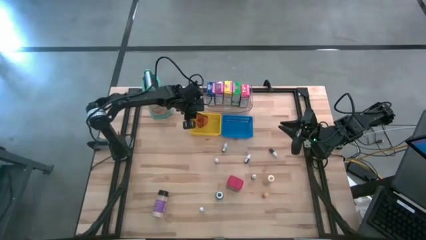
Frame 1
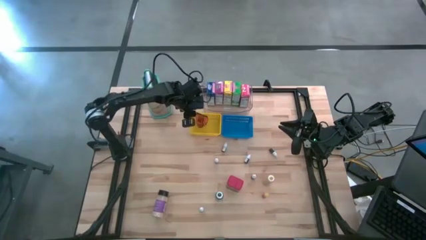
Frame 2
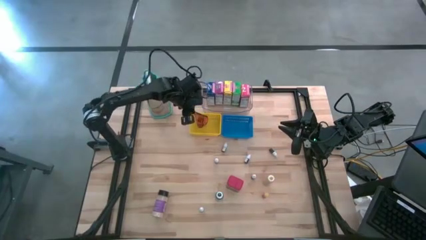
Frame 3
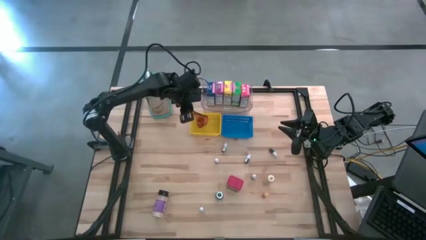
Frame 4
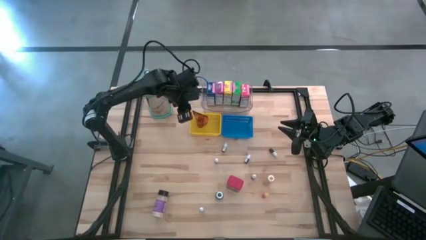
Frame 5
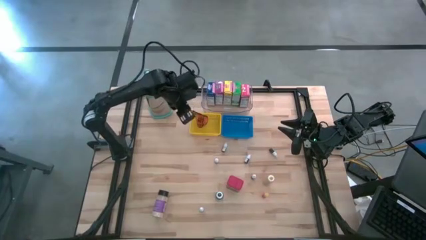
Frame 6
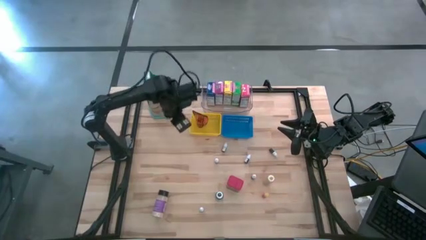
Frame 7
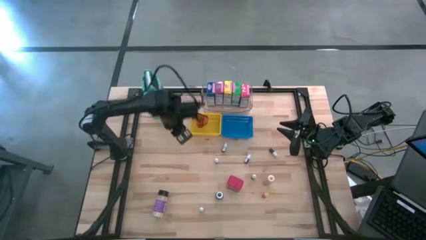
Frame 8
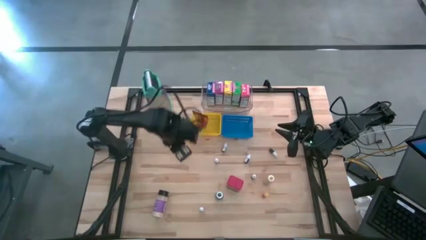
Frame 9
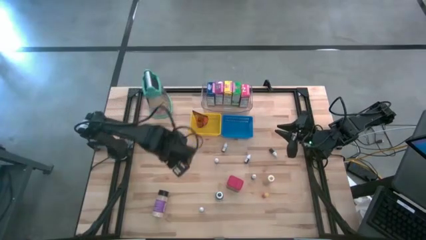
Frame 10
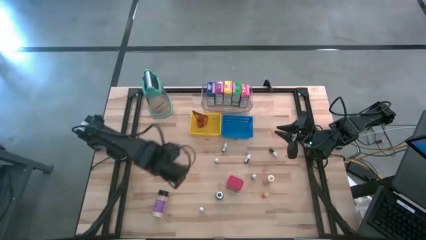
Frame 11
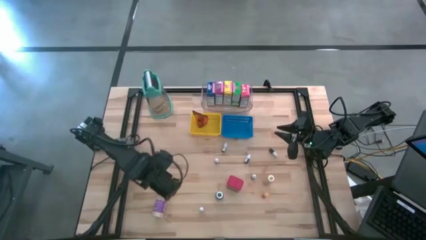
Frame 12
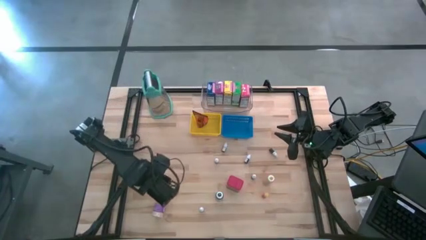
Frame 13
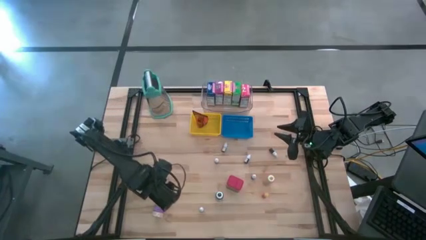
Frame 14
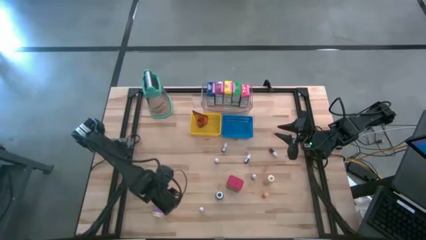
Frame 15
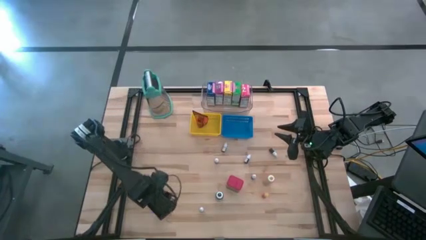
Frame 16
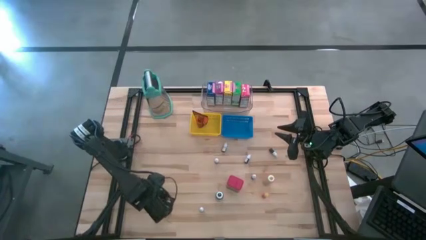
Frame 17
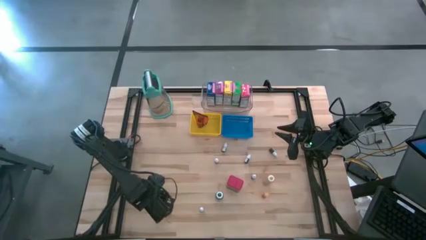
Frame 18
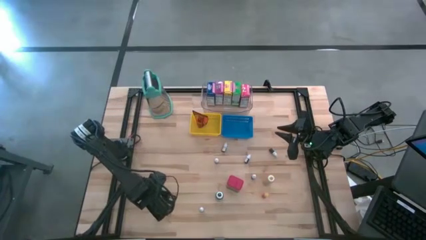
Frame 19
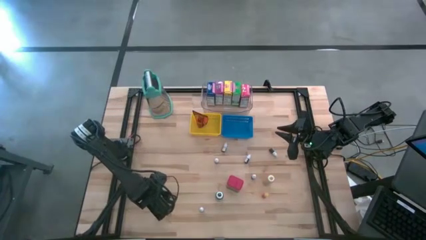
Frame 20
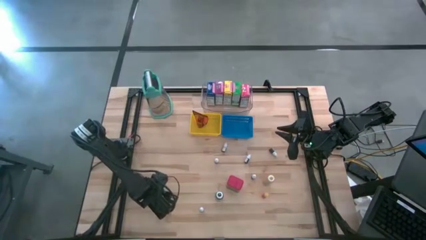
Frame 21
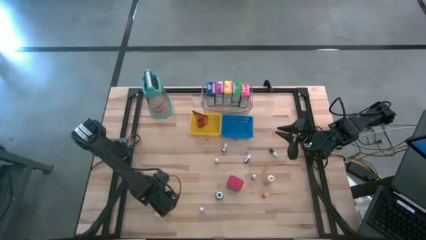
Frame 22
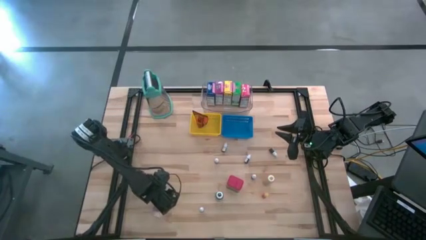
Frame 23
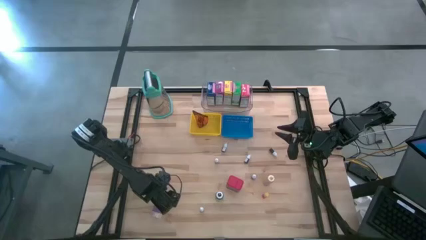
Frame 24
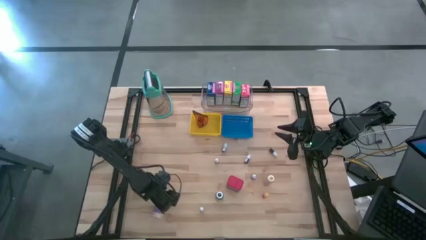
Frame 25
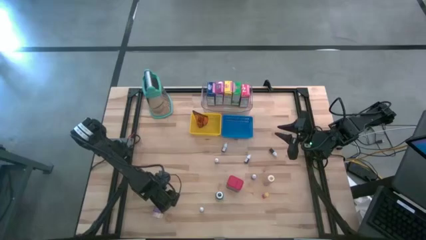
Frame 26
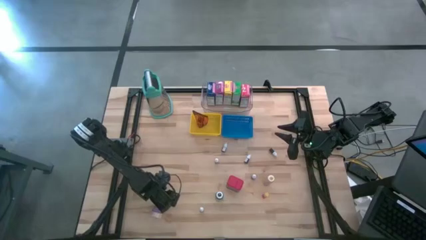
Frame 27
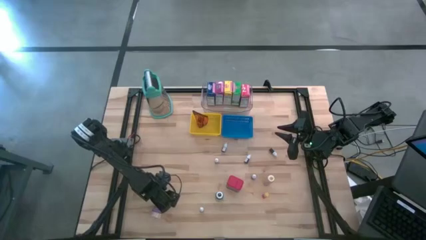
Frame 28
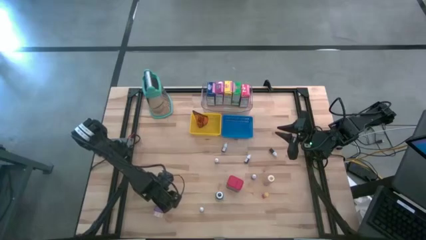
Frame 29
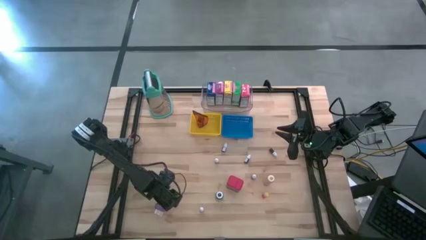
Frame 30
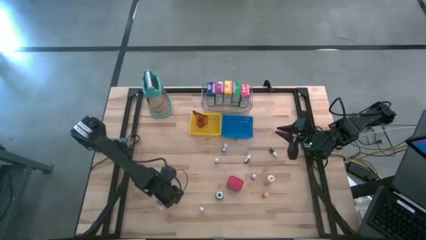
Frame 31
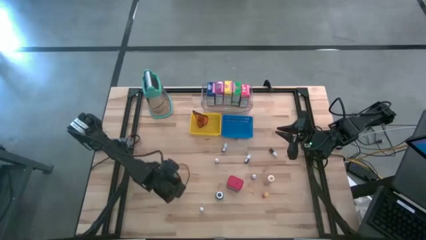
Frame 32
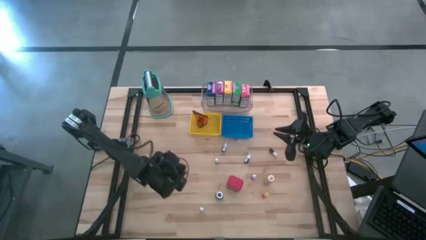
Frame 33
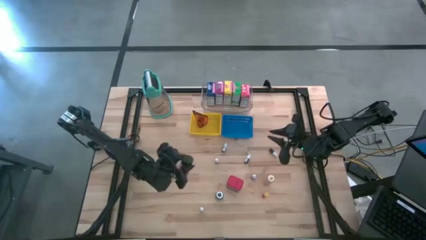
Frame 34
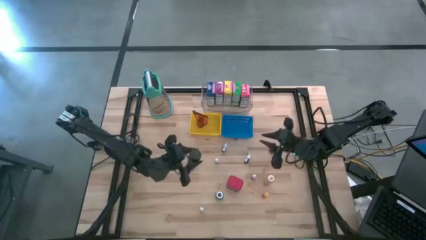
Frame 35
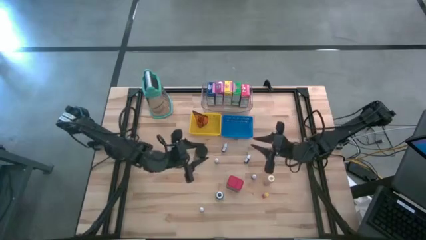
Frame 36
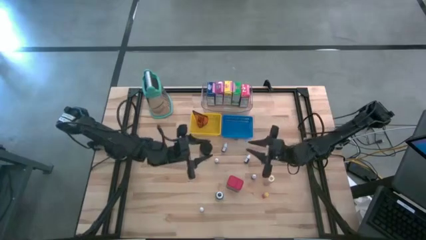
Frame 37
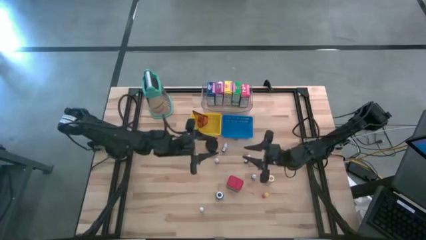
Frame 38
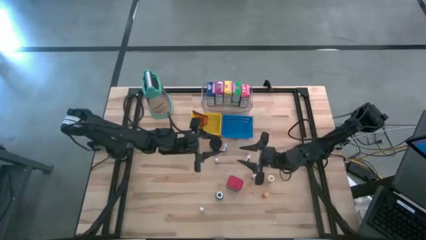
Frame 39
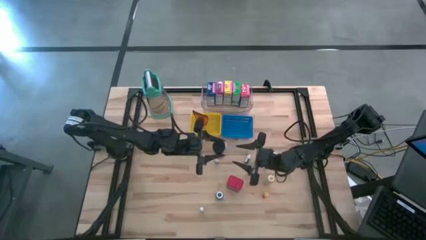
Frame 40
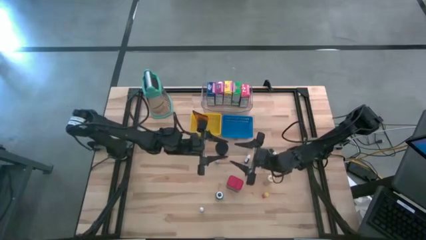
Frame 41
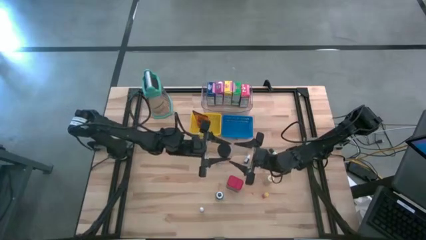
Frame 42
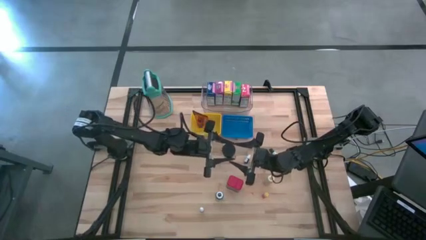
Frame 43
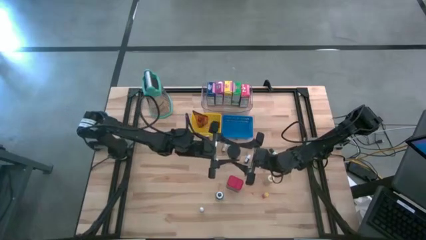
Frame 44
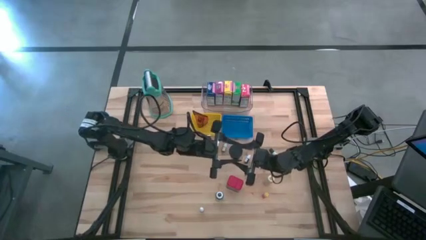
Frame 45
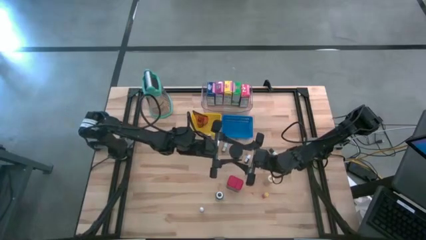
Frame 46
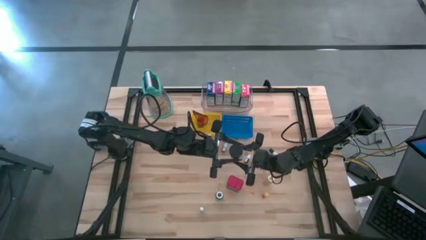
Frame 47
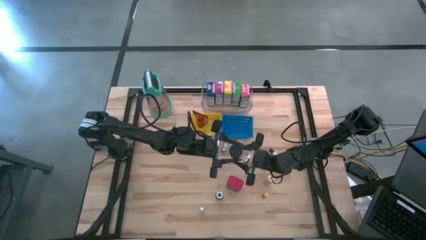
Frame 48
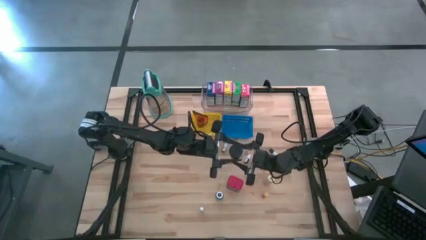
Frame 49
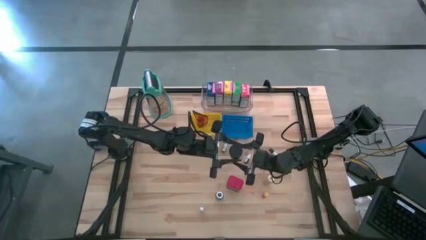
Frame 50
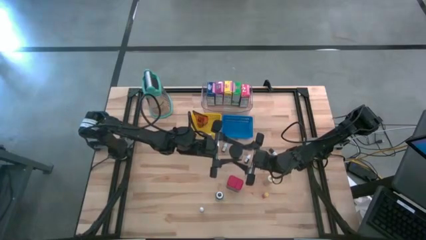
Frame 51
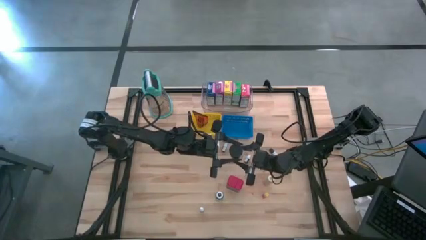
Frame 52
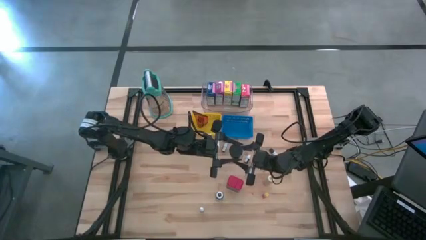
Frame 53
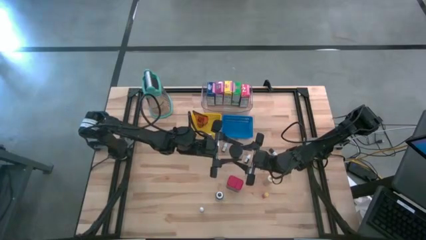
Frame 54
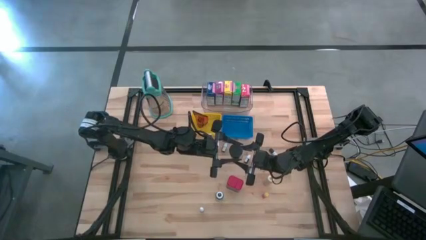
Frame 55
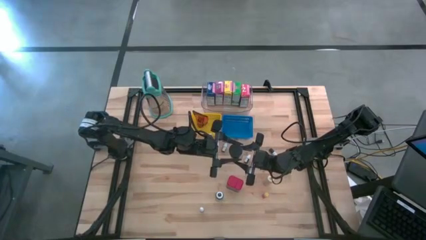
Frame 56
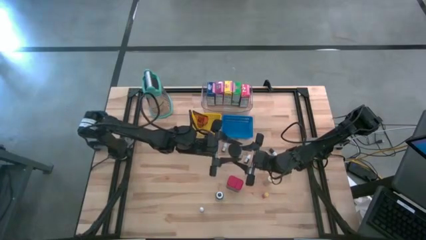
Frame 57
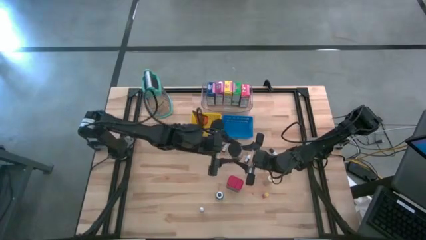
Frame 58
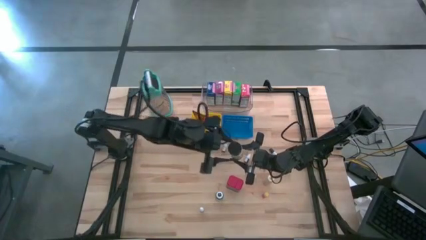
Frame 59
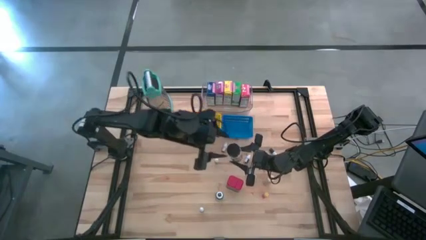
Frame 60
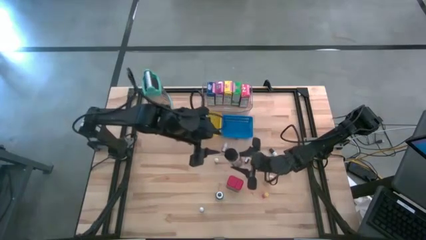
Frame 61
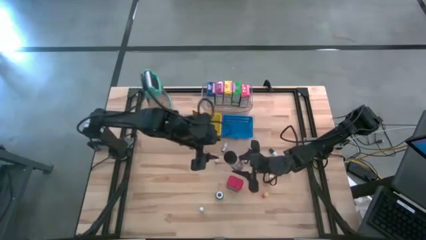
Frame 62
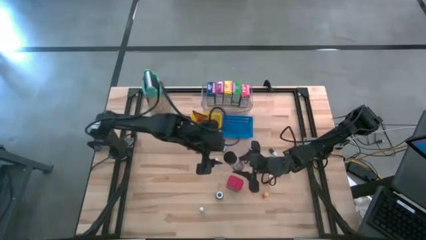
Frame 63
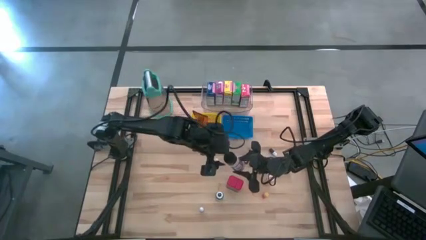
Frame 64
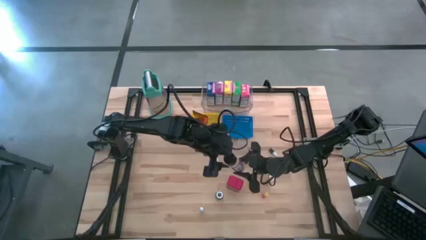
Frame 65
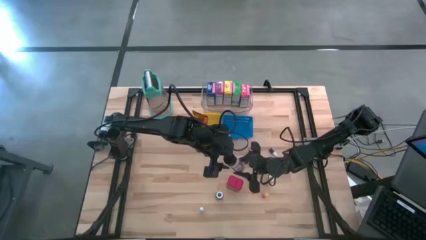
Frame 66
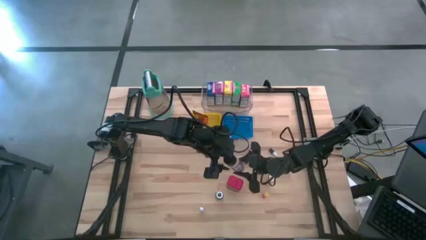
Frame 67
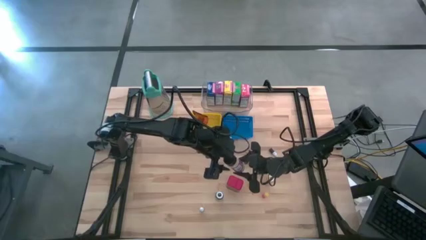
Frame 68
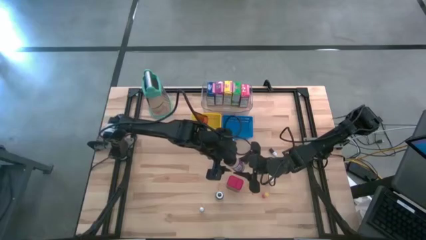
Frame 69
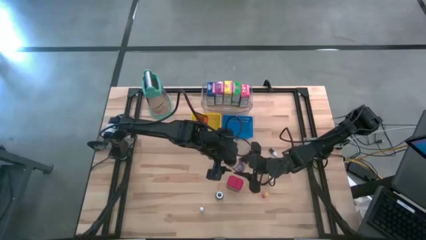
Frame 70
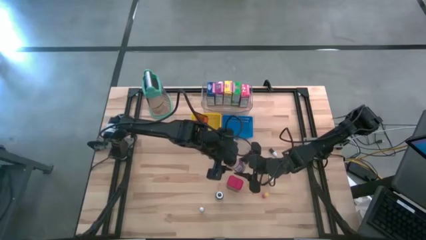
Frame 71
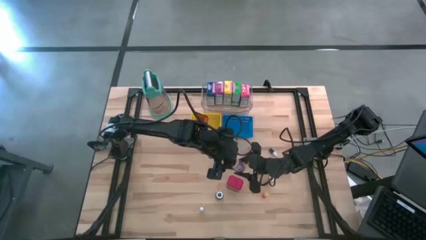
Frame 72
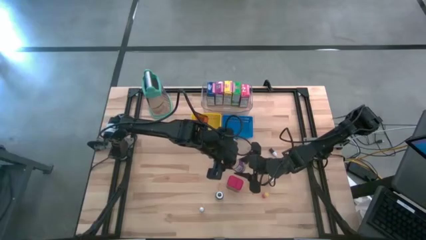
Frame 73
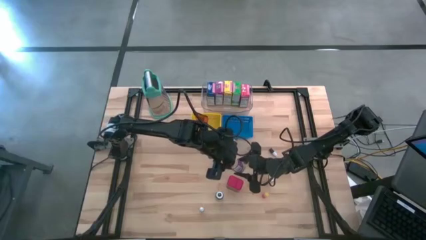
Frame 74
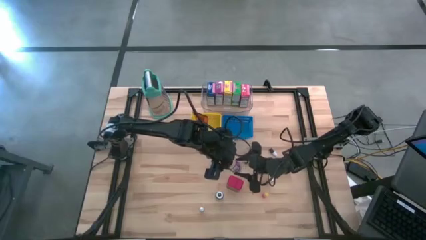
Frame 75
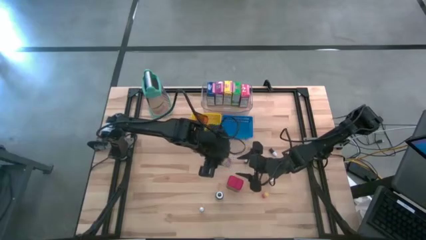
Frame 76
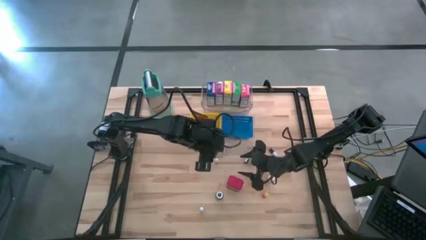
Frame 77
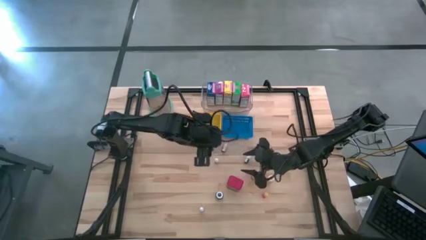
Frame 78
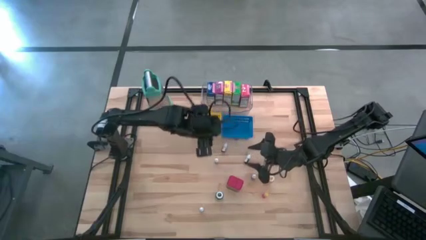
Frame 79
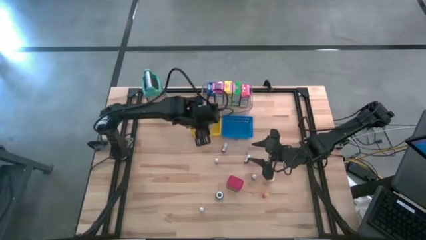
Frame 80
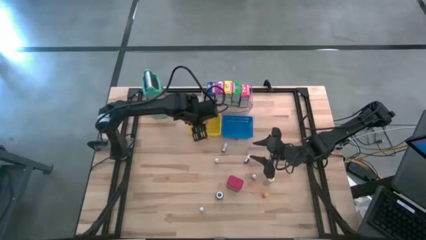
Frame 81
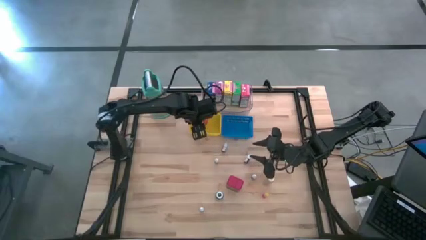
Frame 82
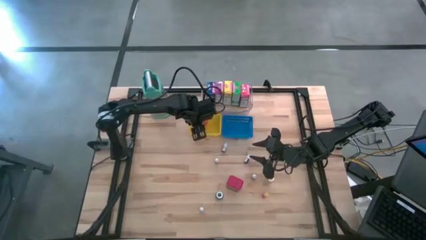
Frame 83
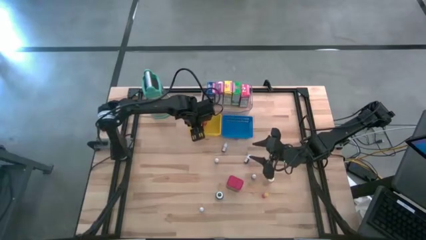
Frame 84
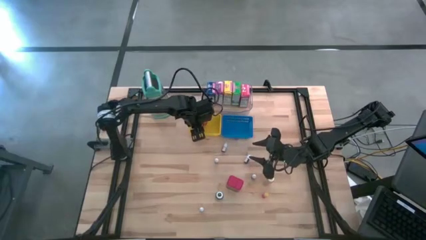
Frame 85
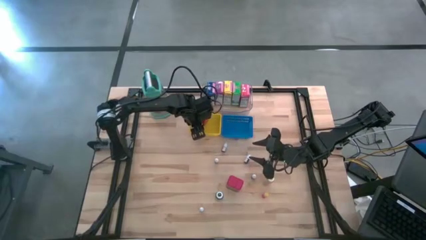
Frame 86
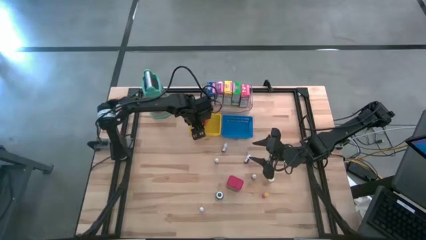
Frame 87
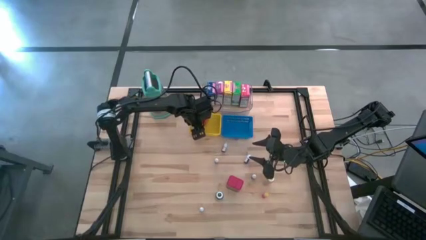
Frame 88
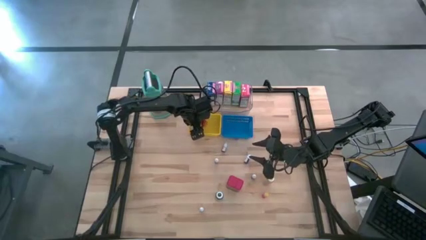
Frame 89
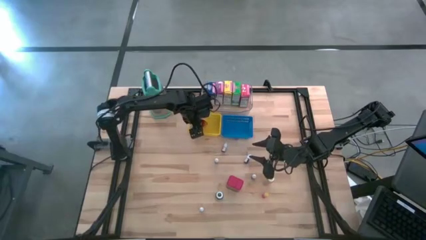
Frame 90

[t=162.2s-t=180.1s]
Task: Pick & Place Kitchen Items
Put the black seasoning bottle into the yellow bin
